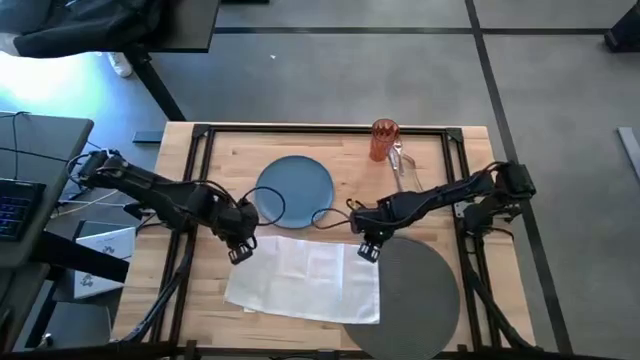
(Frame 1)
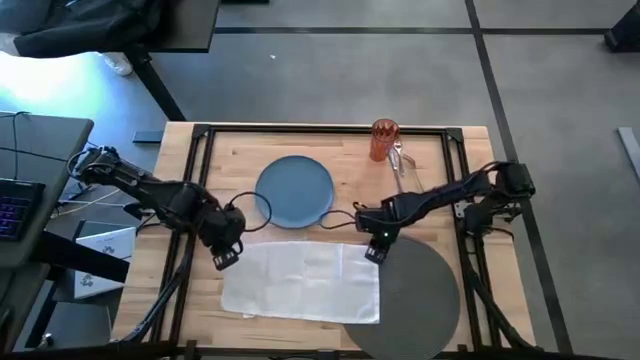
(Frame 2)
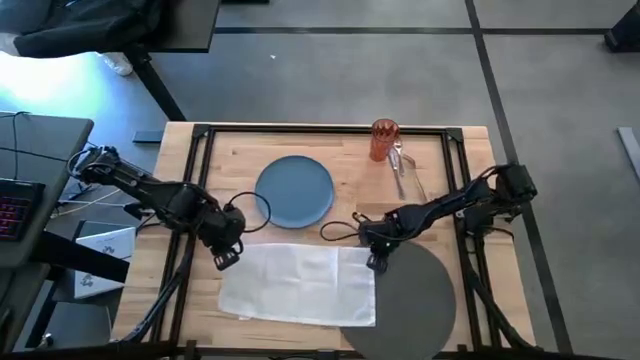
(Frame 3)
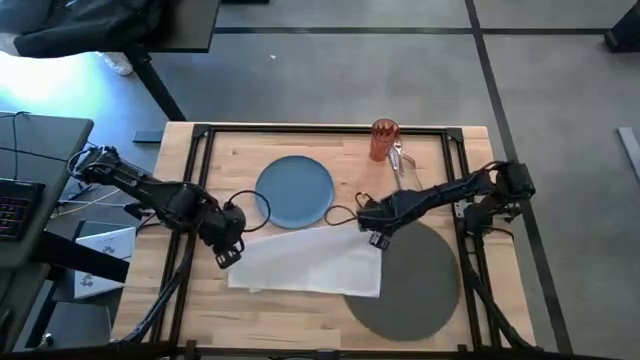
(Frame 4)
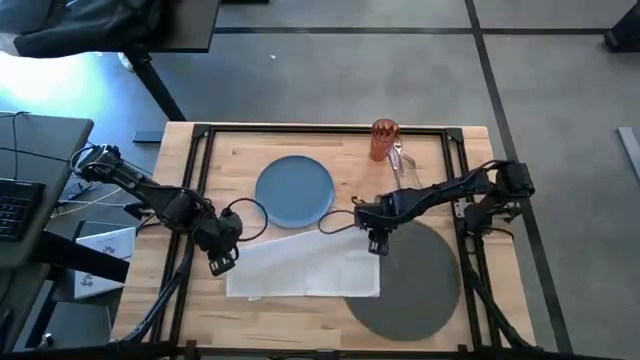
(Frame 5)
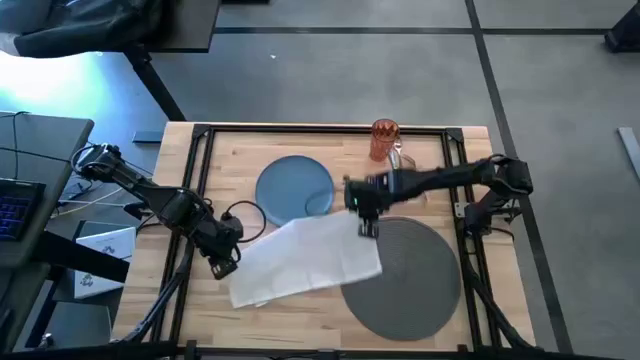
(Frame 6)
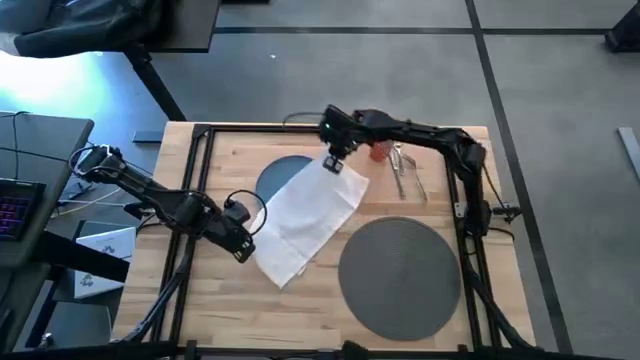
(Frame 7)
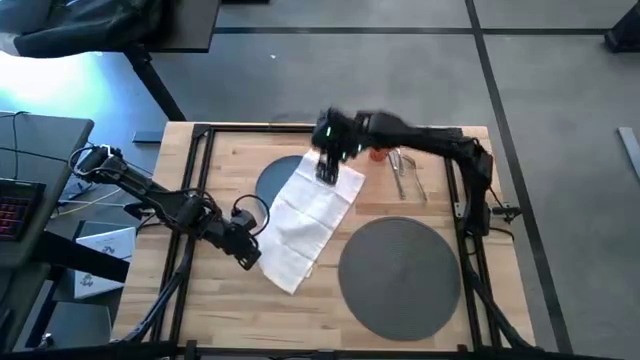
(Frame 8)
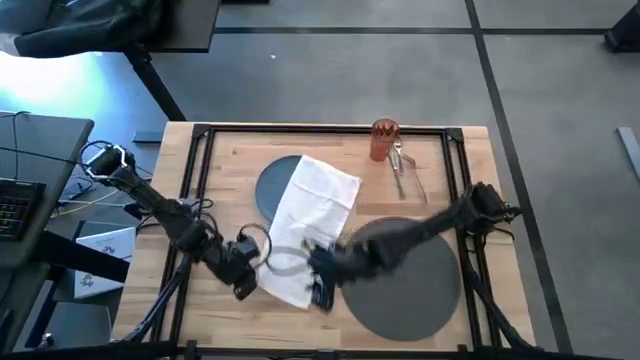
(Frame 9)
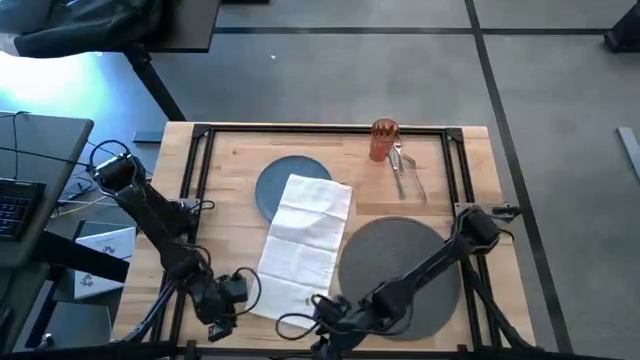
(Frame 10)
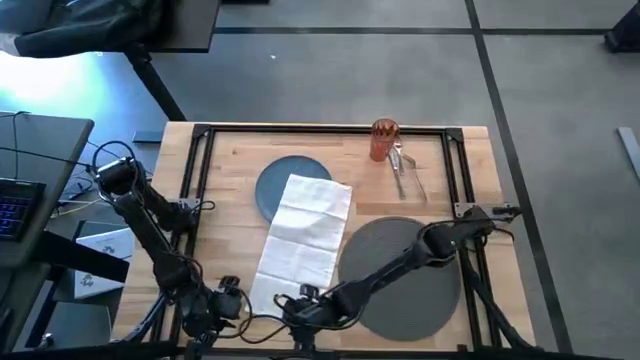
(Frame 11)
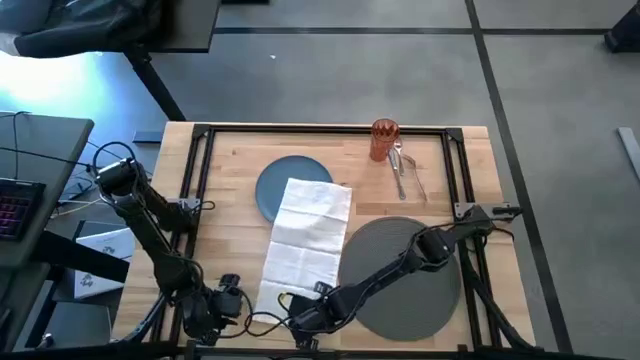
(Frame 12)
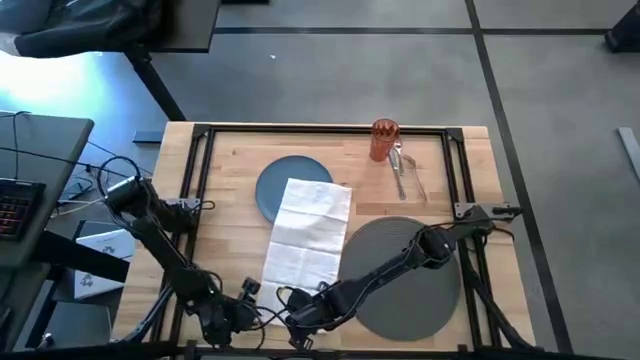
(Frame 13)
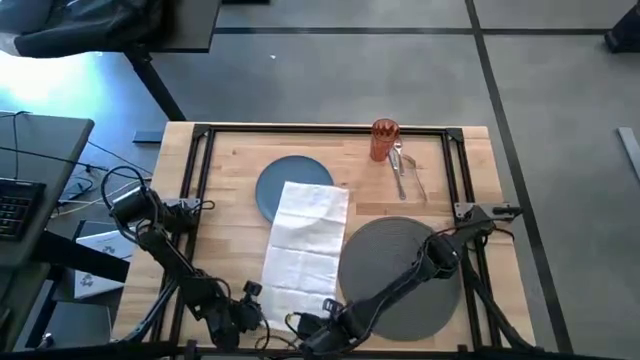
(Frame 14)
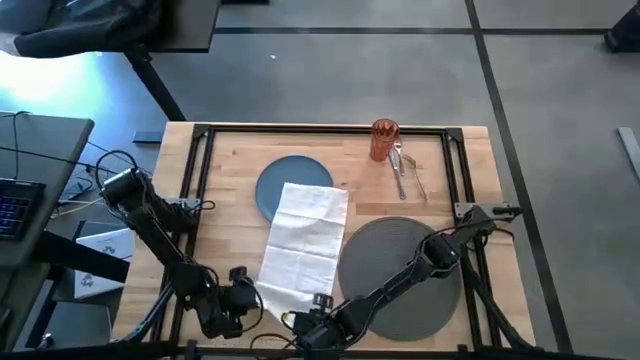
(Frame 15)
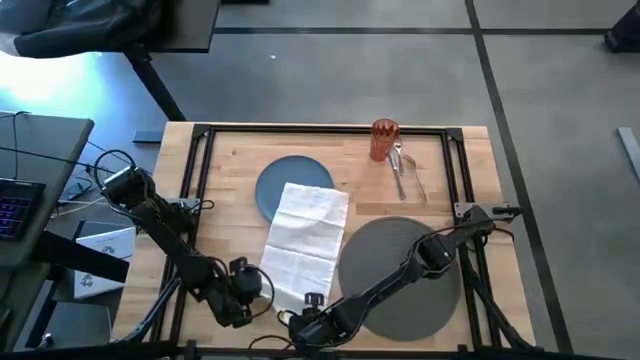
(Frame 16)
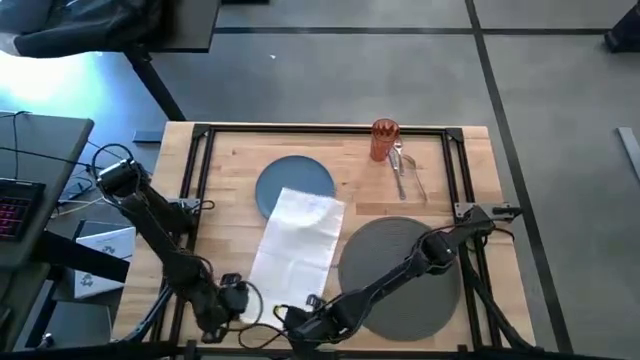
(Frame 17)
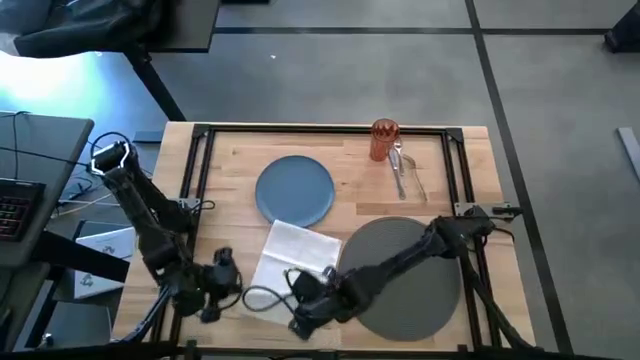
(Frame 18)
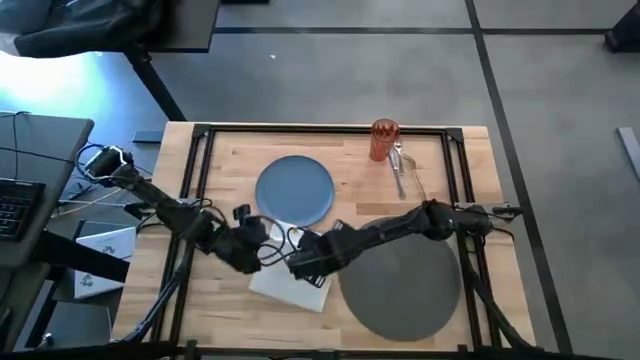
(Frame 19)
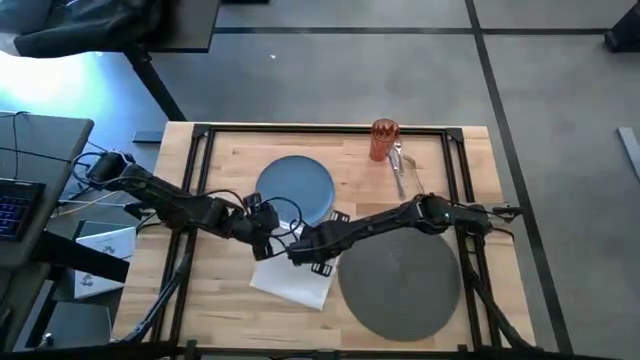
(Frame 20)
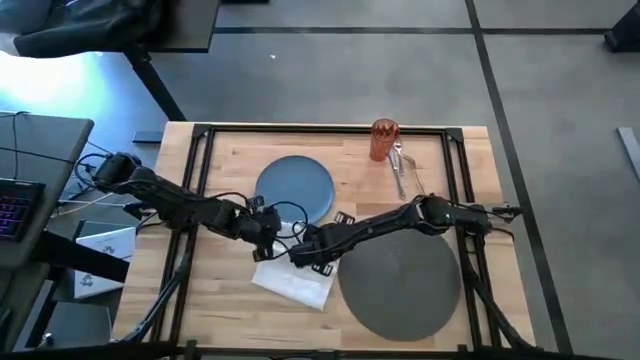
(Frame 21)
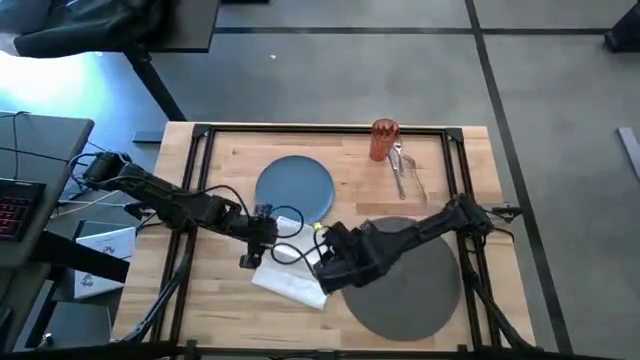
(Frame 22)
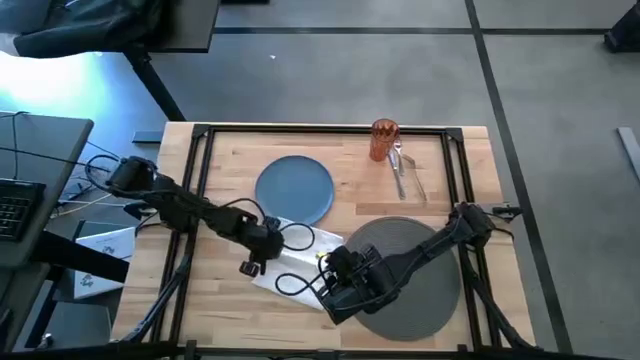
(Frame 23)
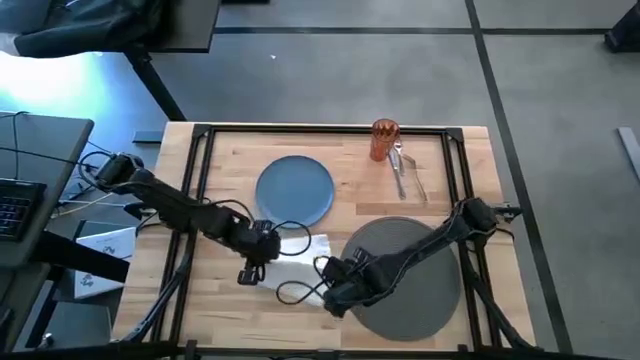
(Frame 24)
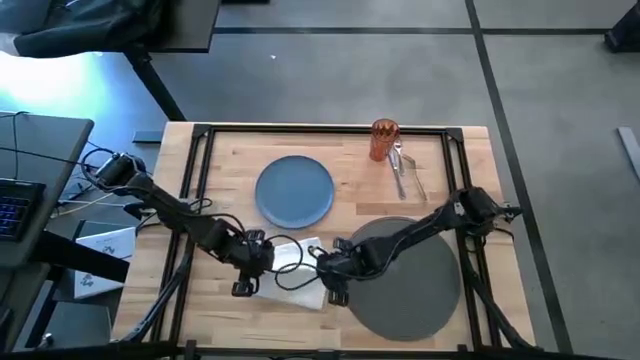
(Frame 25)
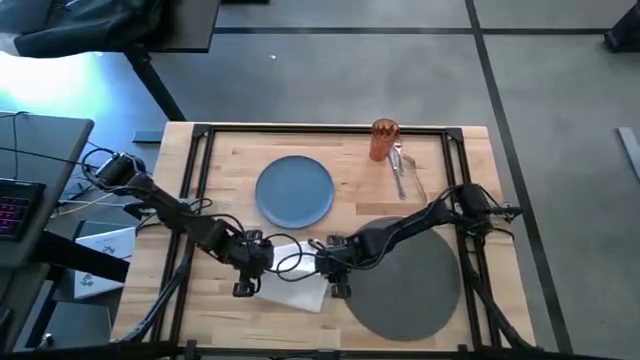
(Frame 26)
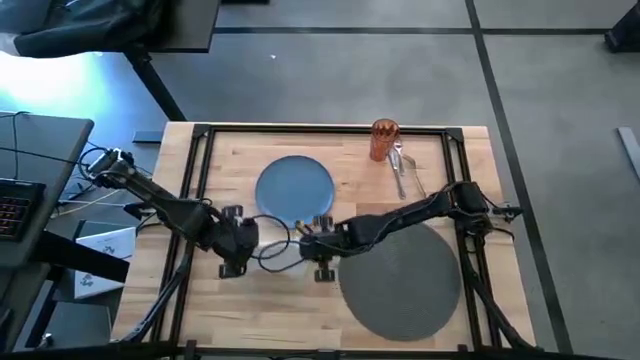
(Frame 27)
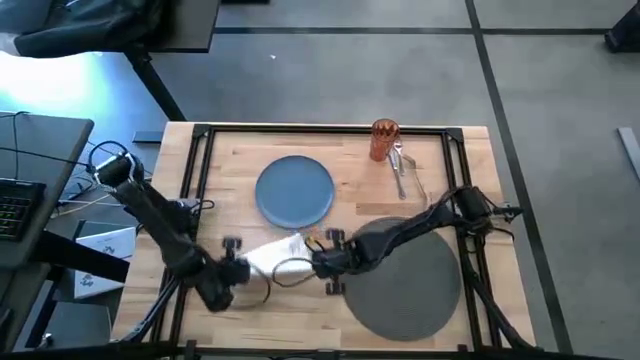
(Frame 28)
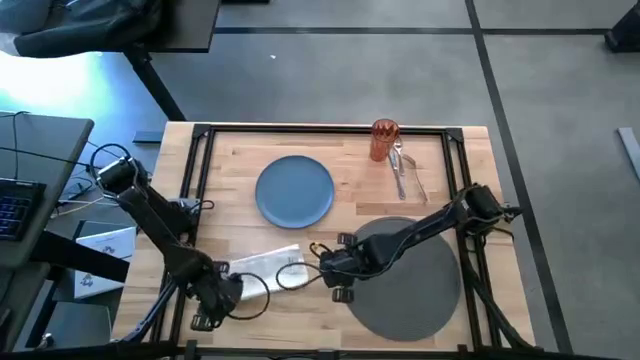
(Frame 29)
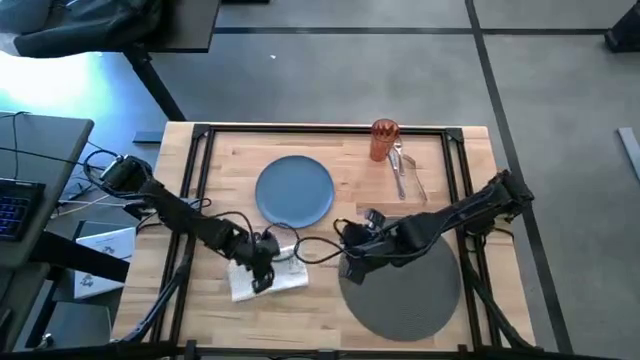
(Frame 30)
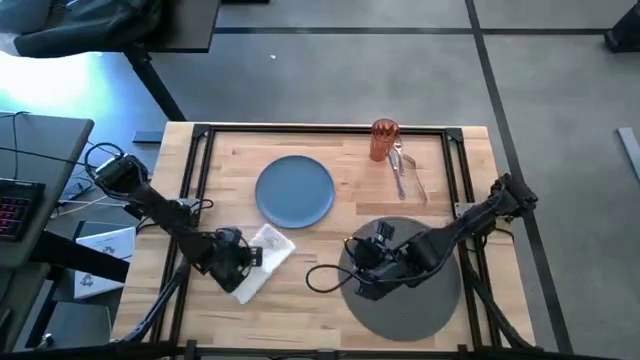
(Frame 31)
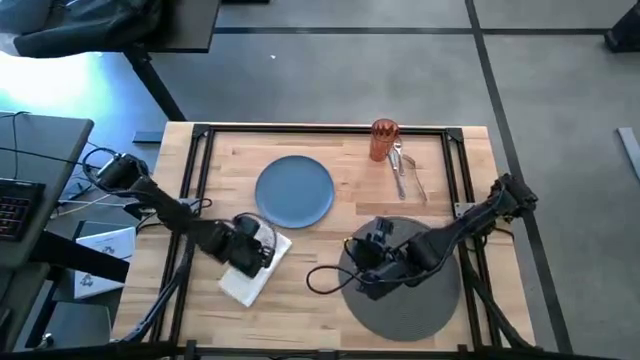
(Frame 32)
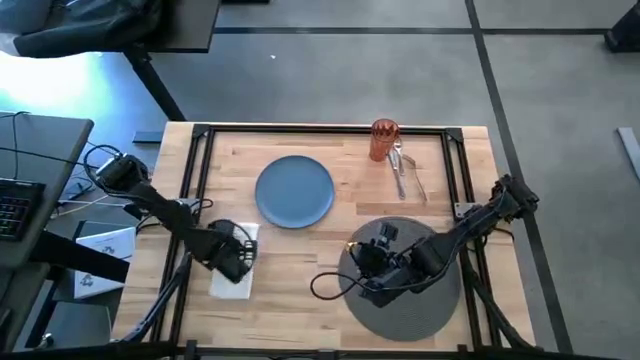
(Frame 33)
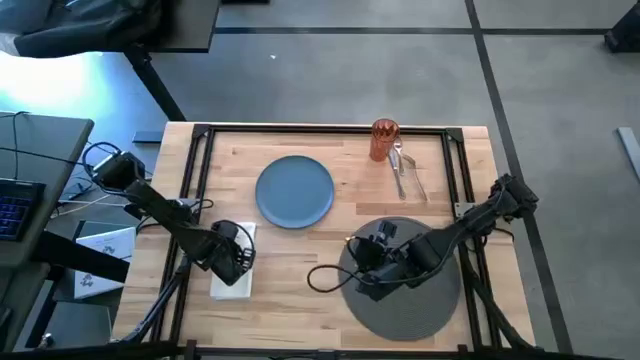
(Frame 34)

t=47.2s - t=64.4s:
Task: Set table place
Fold the white table napkin

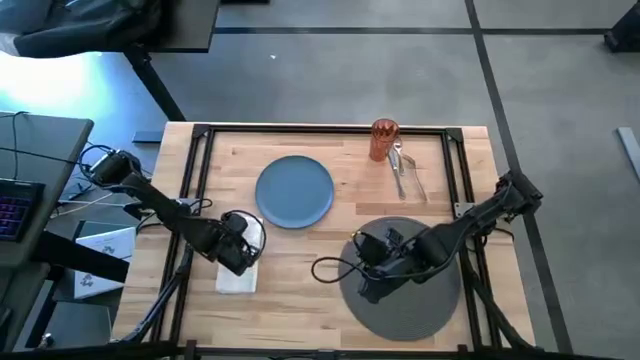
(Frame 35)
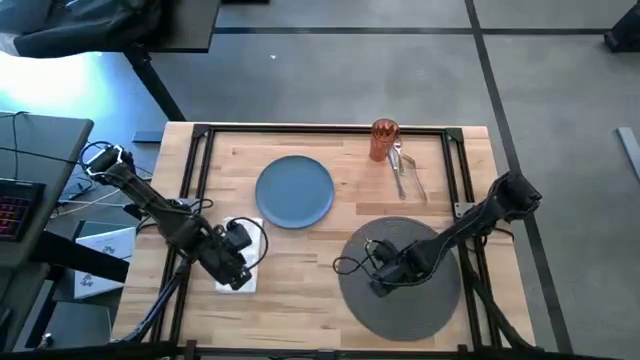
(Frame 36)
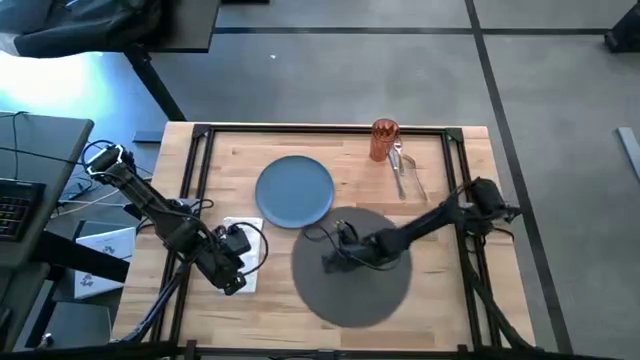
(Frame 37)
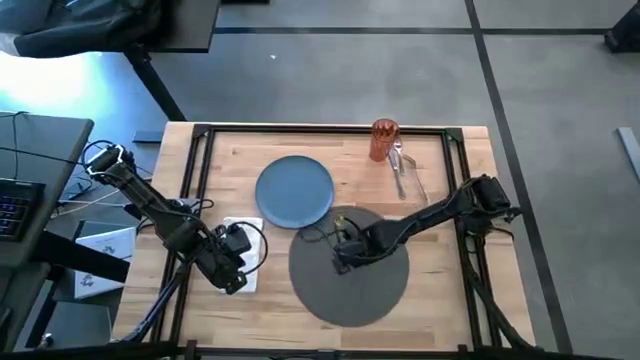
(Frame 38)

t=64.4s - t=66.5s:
Move the table mat to the center of the table

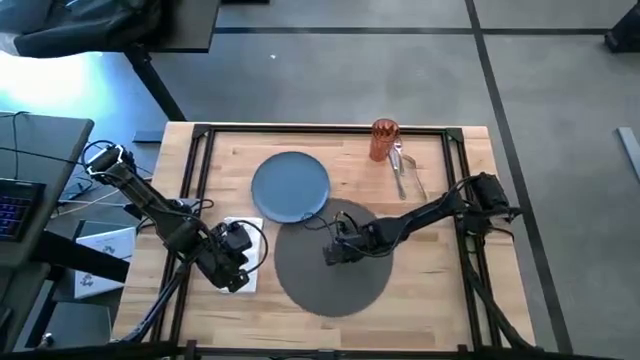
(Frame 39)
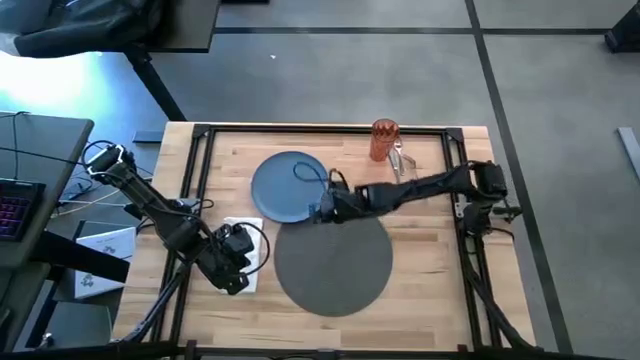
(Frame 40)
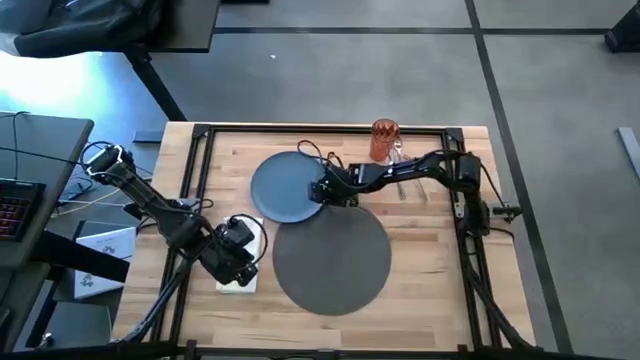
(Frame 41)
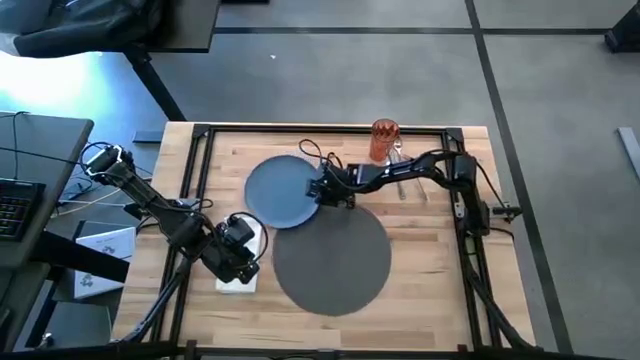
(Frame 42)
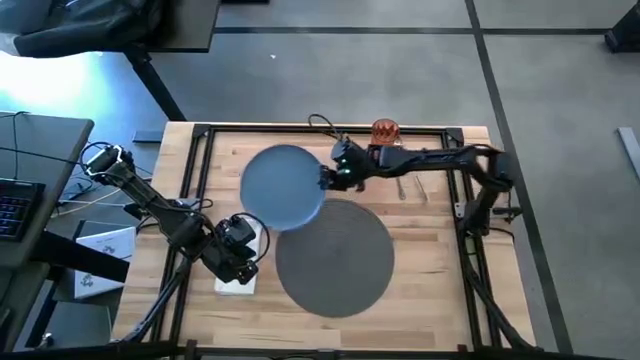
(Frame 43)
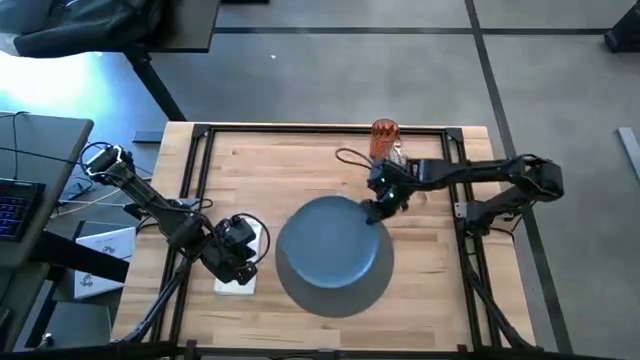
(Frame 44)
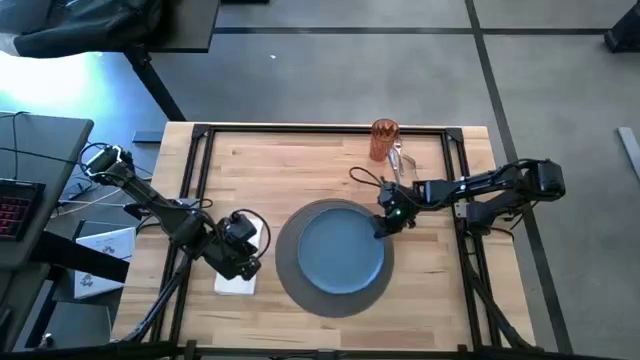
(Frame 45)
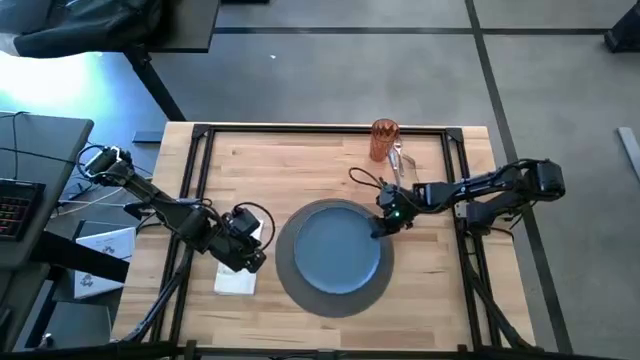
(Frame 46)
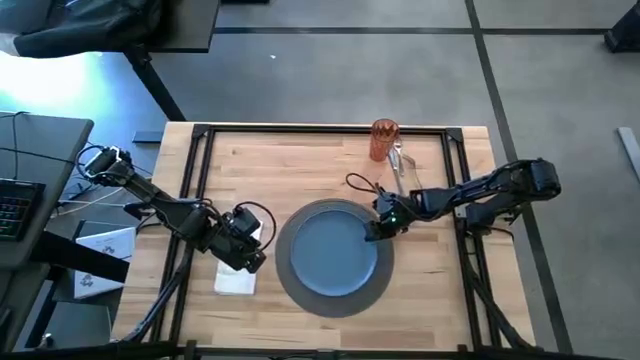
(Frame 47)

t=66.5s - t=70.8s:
Put the blue plate on the table mat
